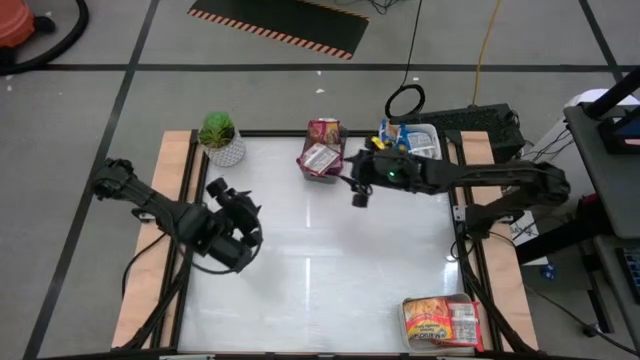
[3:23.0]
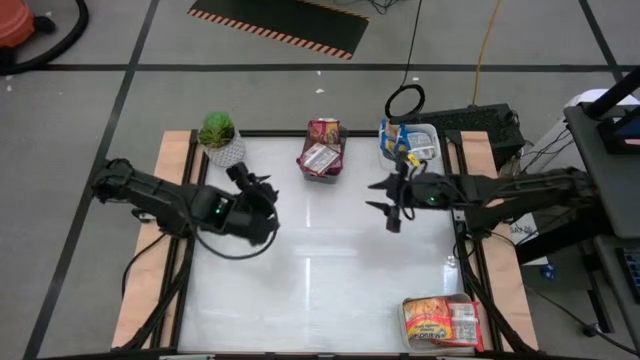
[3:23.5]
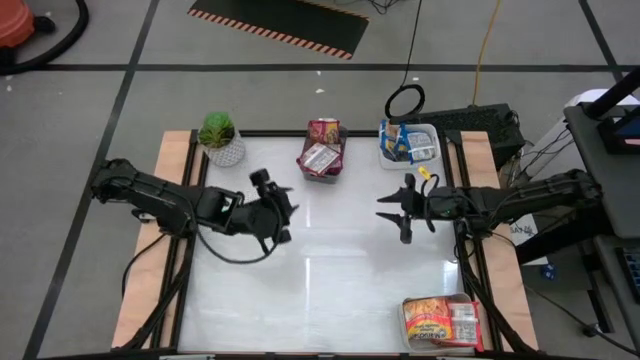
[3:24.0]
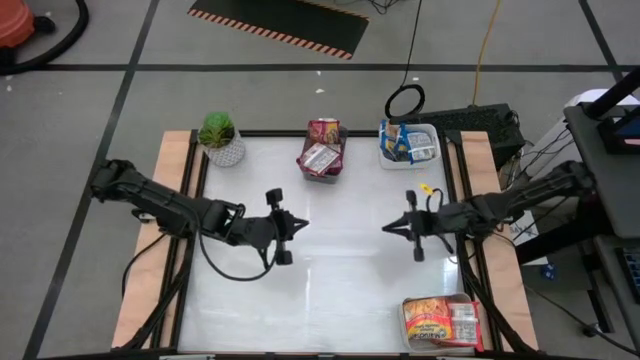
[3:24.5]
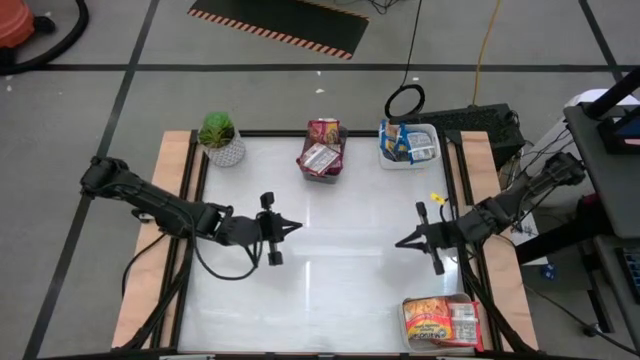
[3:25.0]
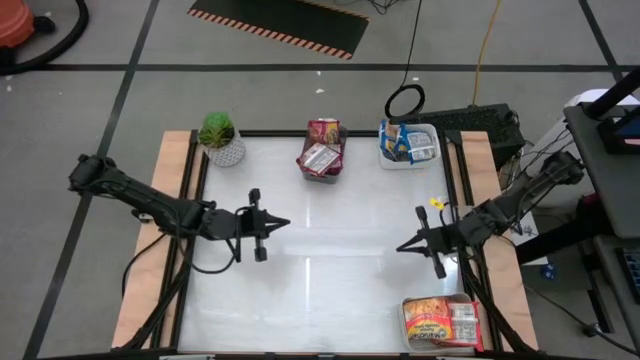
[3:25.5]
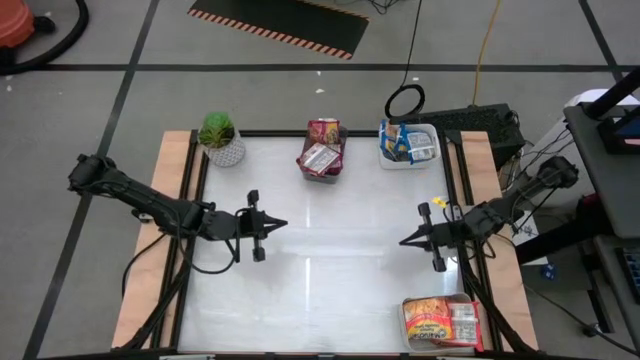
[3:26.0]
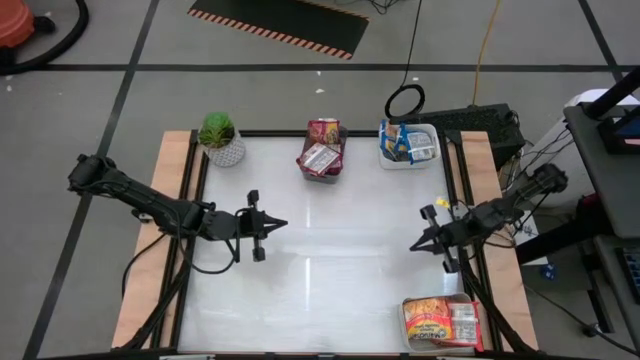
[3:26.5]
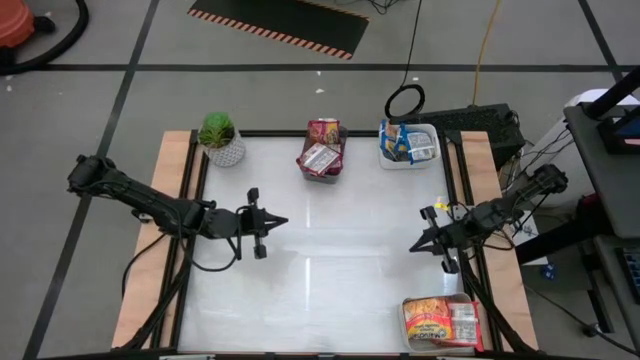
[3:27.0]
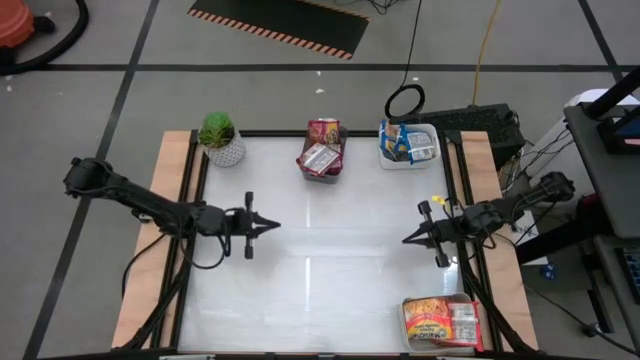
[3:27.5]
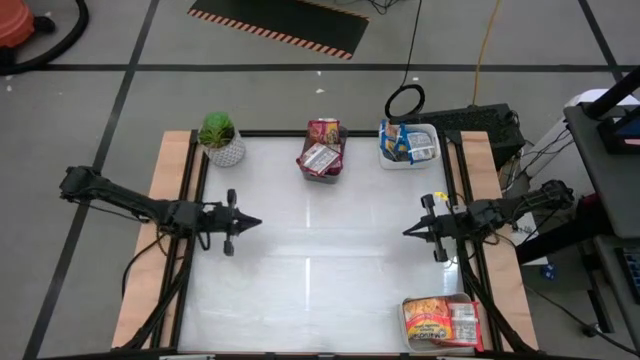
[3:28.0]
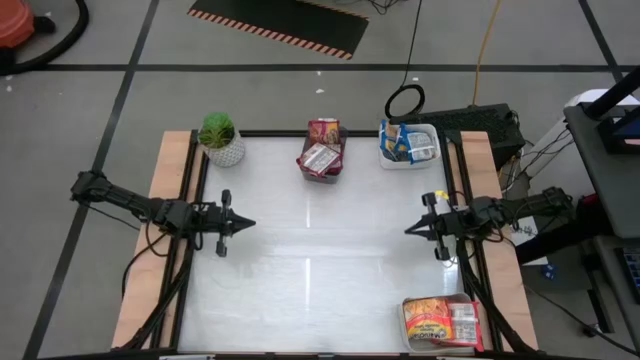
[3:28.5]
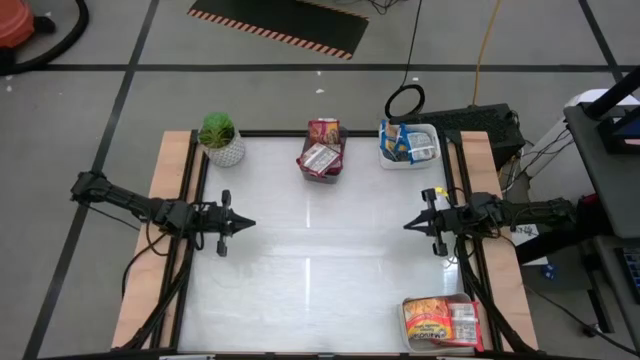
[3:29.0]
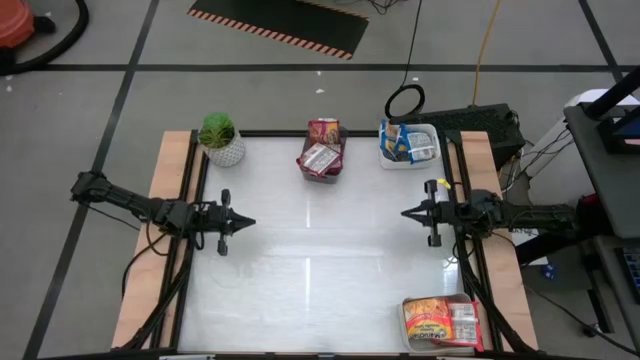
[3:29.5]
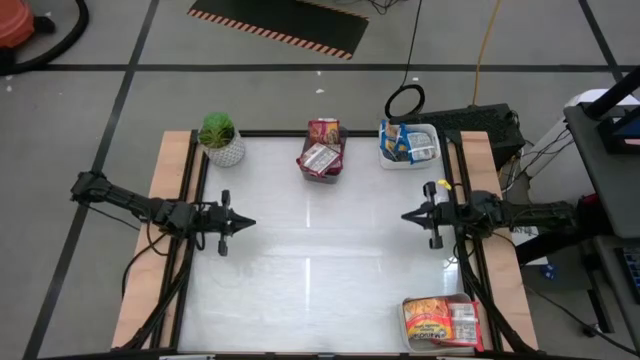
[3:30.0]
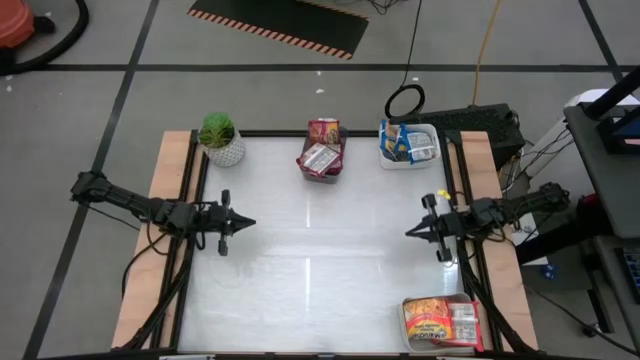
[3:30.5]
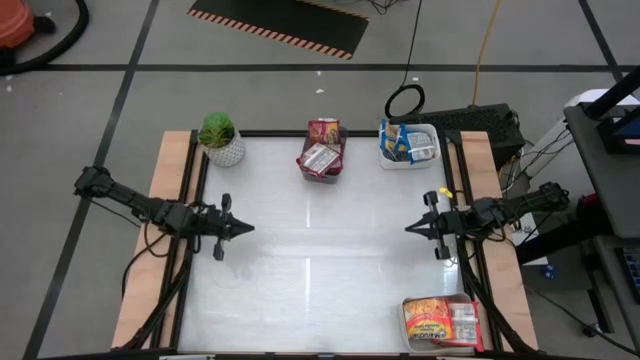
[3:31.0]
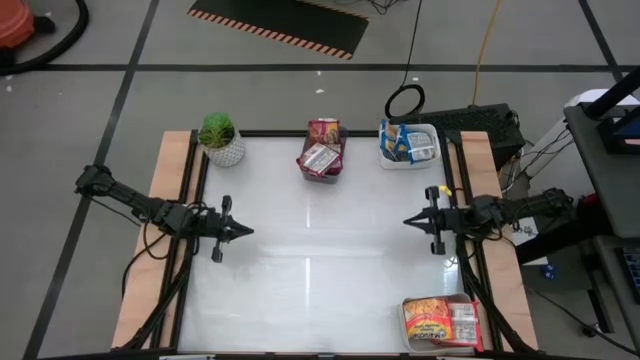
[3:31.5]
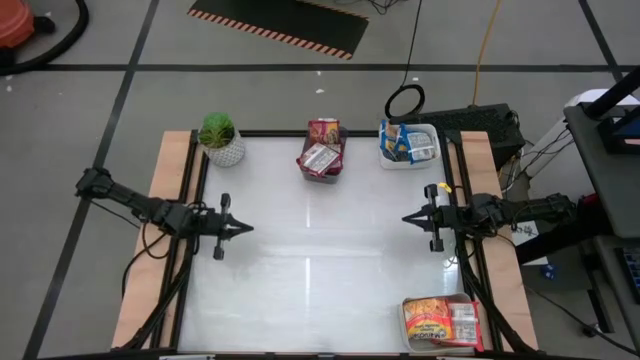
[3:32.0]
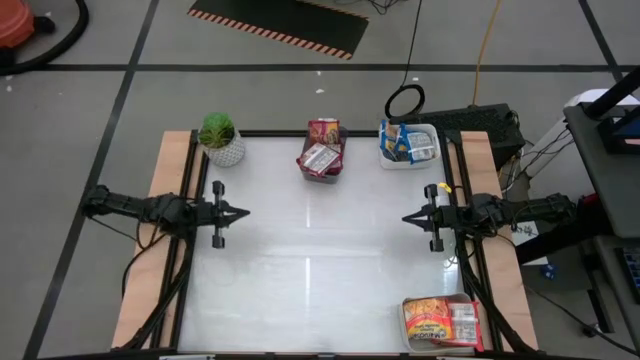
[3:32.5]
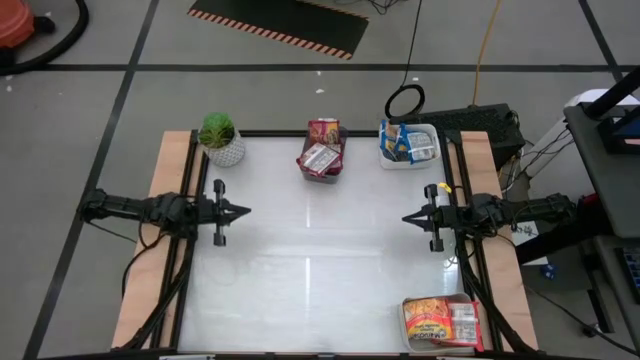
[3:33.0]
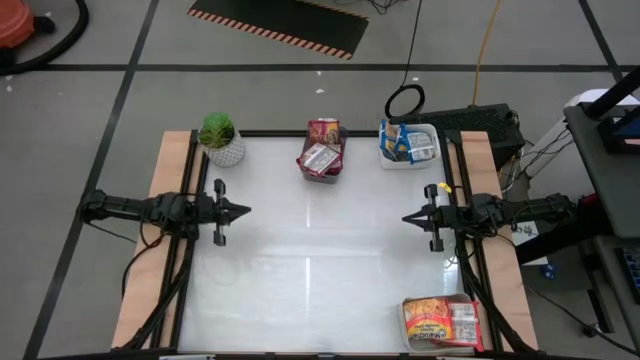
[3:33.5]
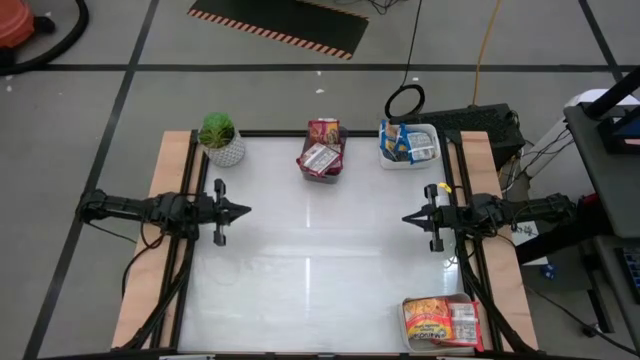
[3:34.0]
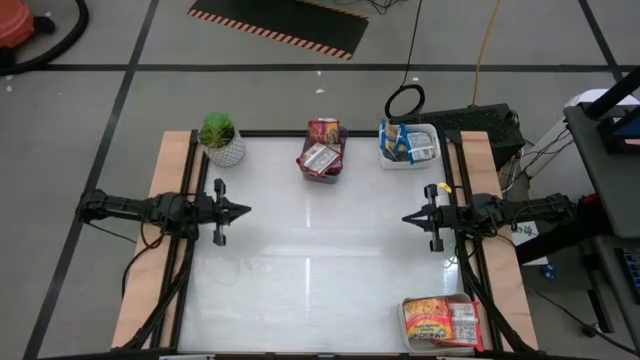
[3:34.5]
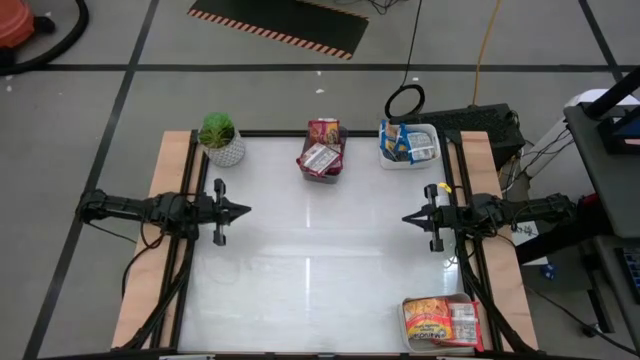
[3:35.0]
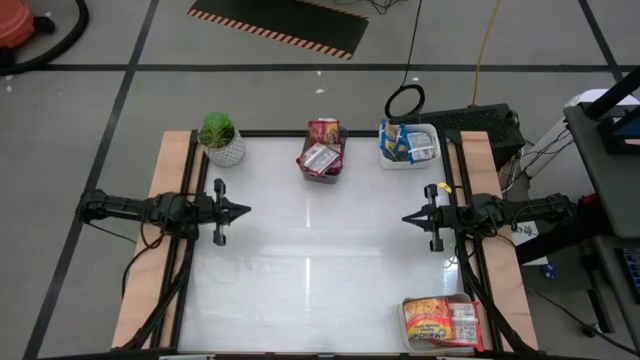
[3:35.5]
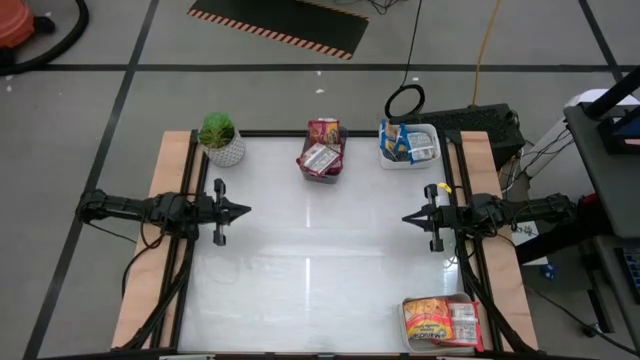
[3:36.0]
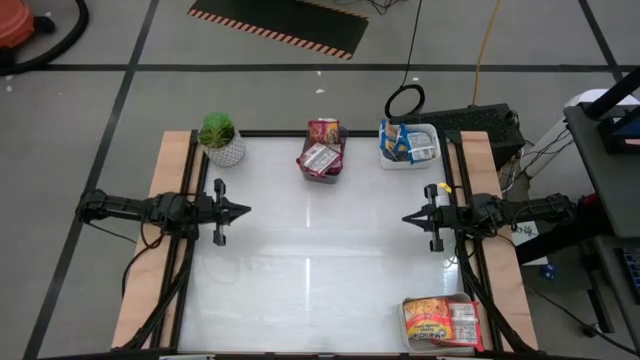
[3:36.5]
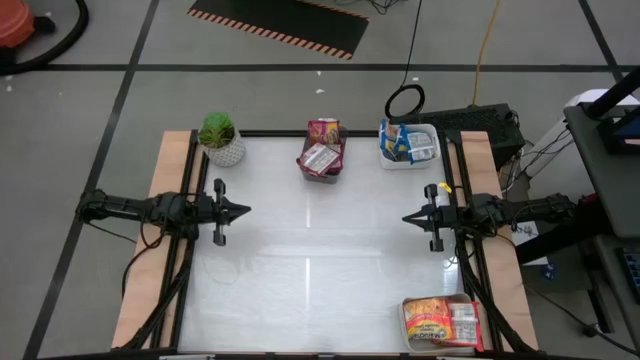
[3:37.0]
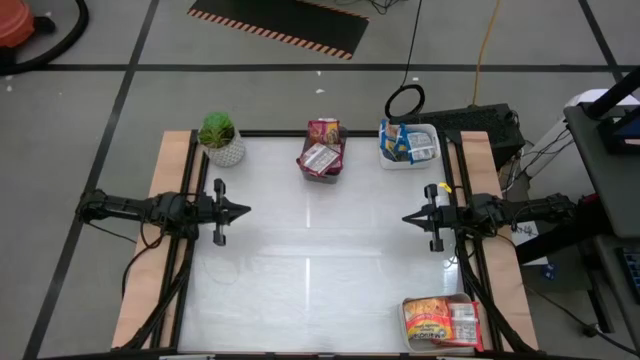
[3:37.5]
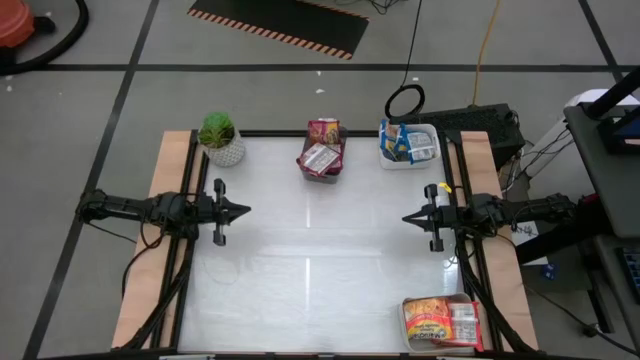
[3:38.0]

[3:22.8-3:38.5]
Task: Sort Maruchan noodles
Return to Home Position

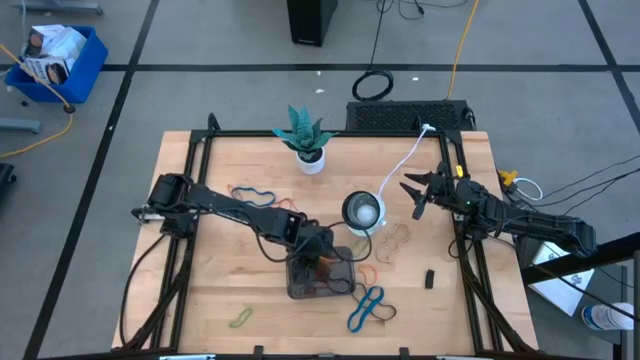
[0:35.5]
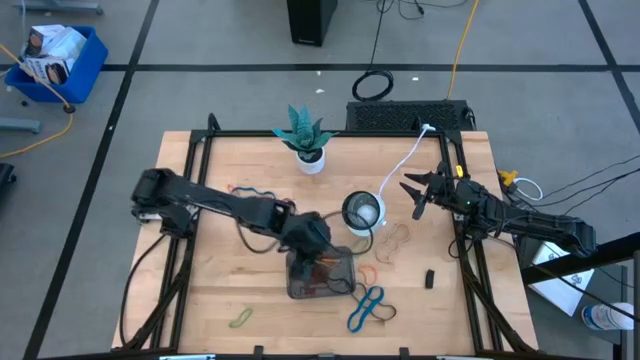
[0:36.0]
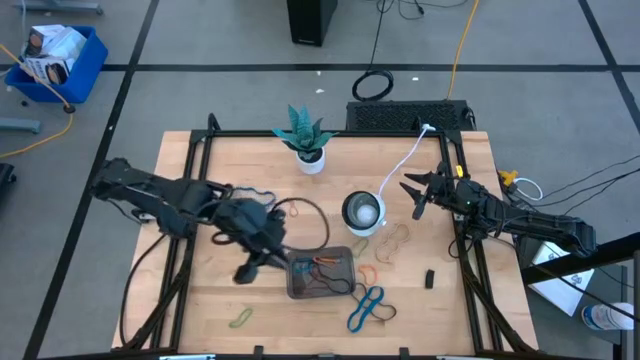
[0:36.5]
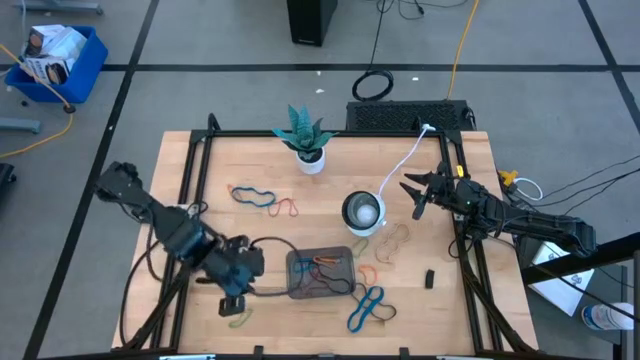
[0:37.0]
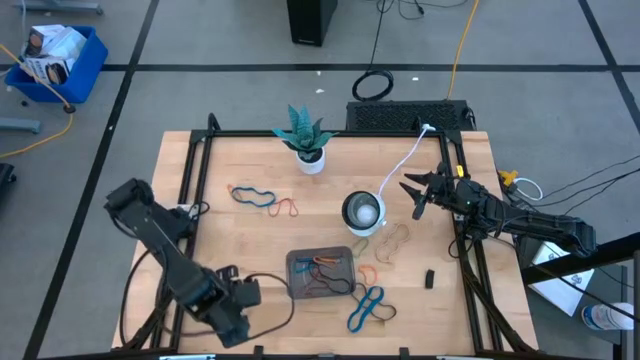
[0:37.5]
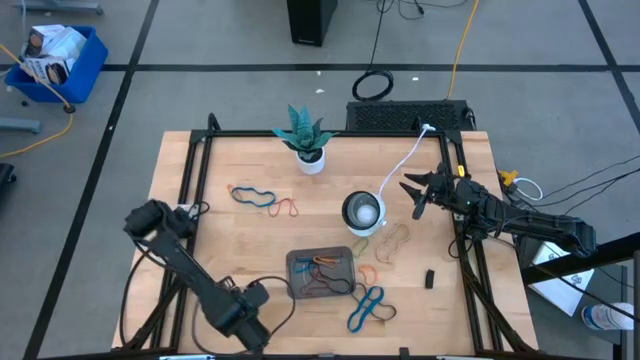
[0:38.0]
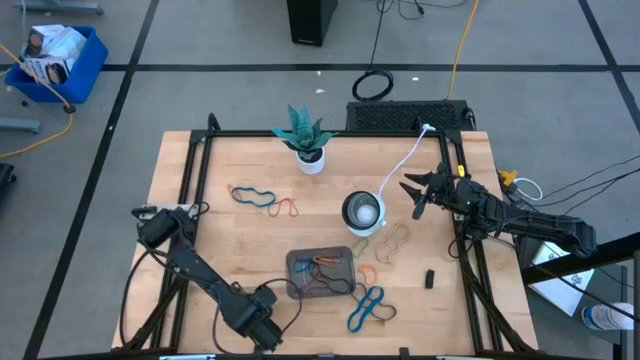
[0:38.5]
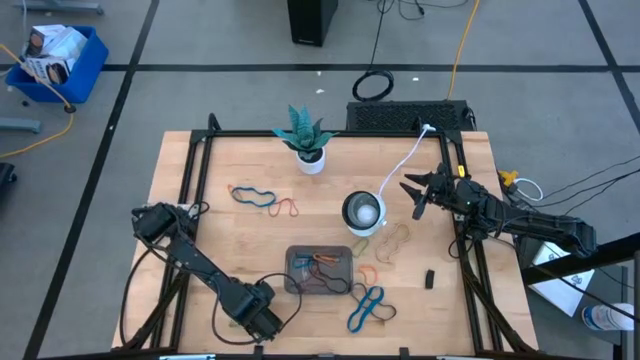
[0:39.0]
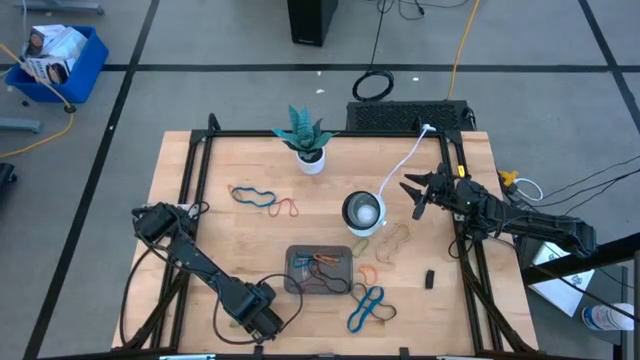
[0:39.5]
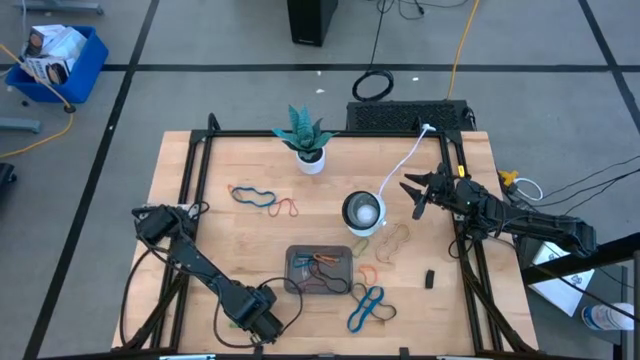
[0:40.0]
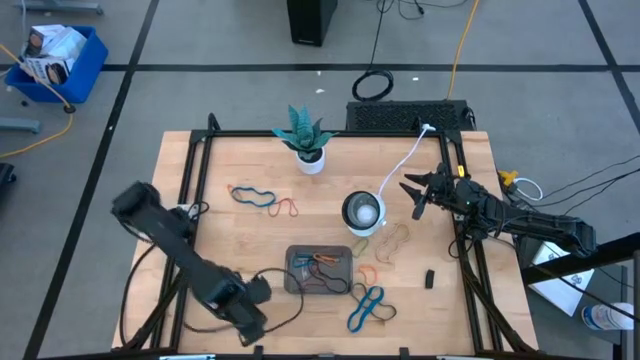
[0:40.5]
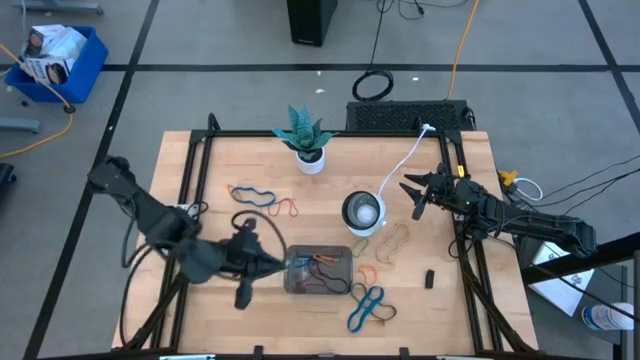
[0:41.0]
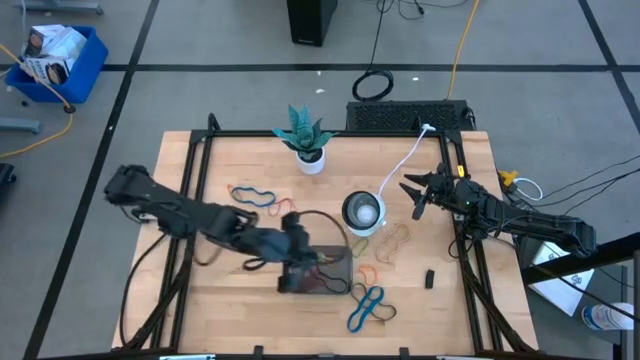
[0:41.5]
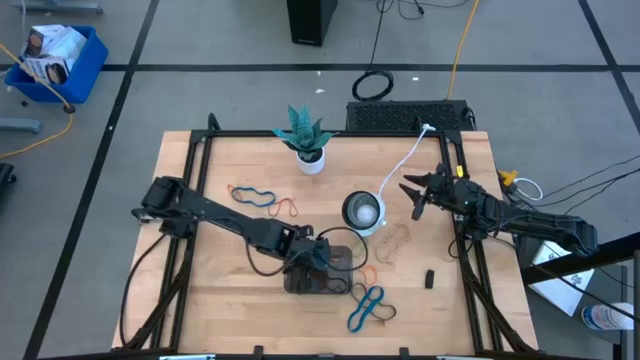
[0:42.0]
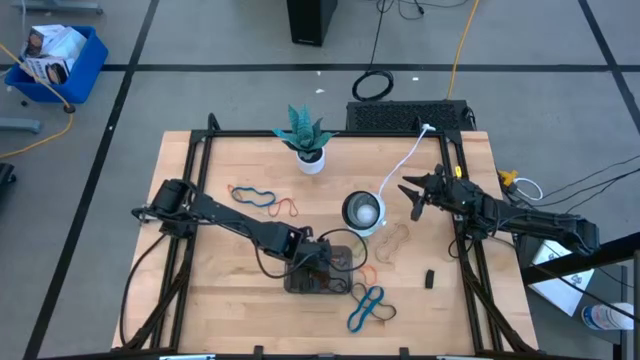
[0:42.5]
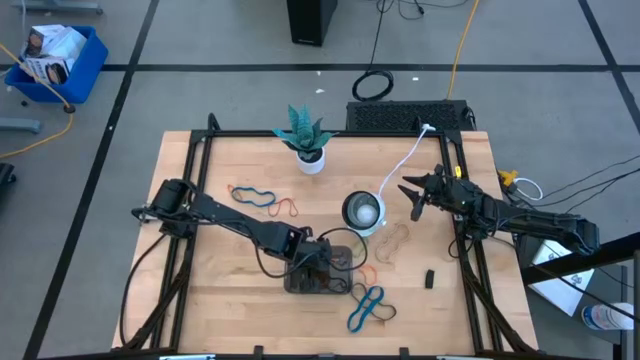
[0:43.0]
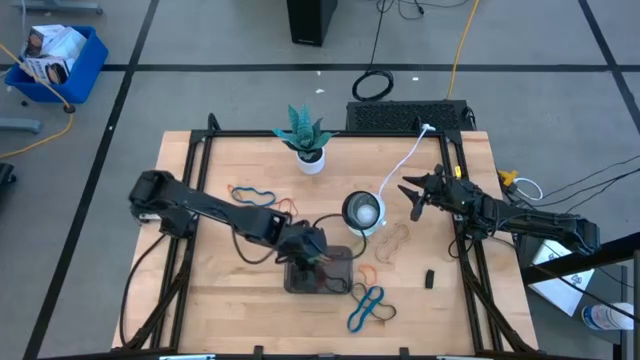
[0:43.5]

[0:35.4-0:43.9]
Task: Pick and place rubber bands into bin
Put the bottom green rubber band into the gray bin
